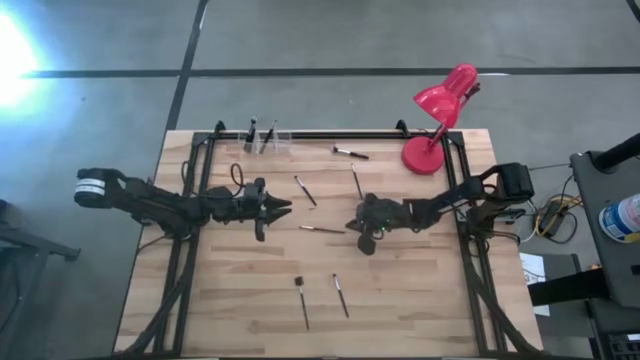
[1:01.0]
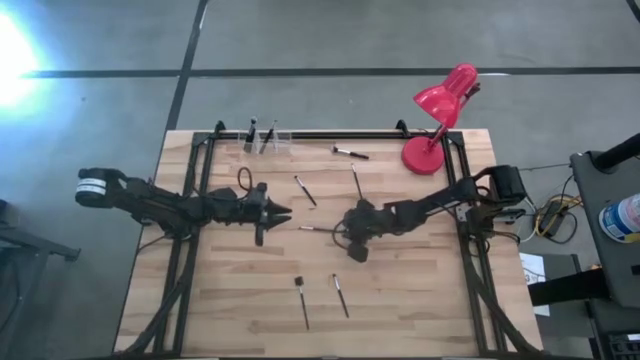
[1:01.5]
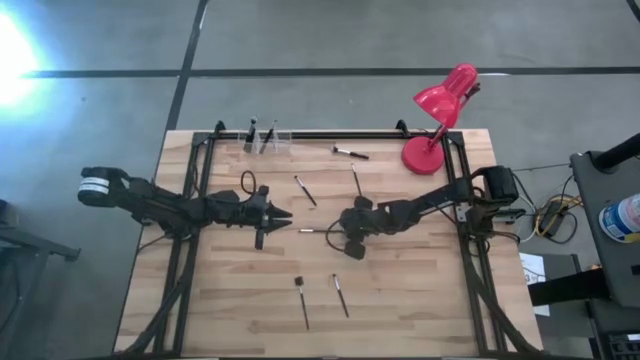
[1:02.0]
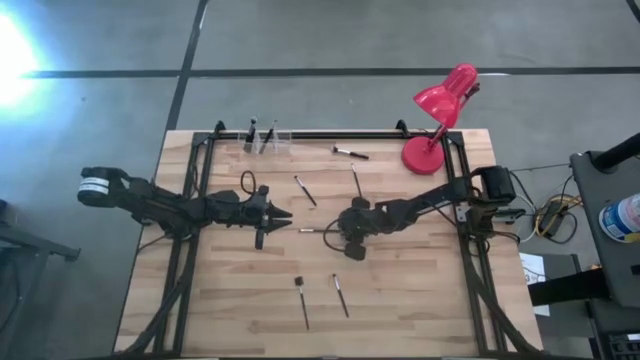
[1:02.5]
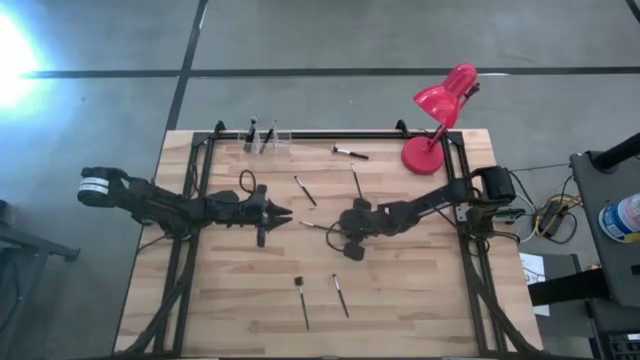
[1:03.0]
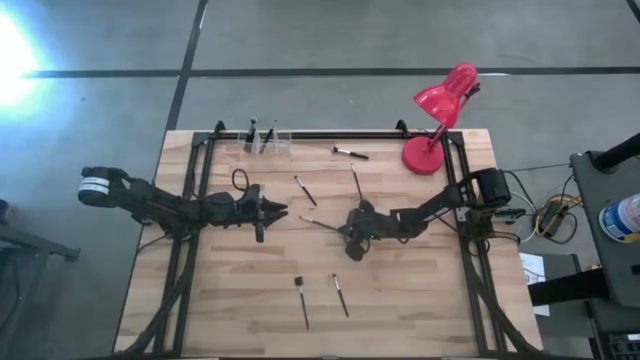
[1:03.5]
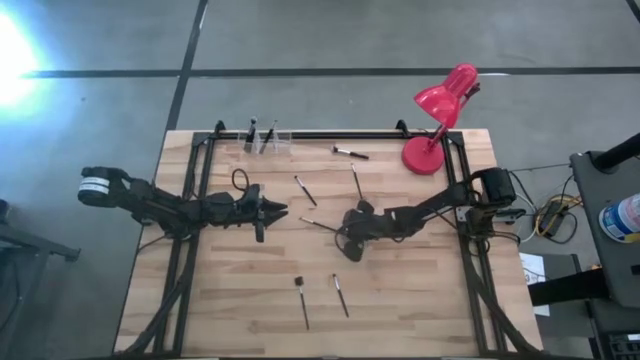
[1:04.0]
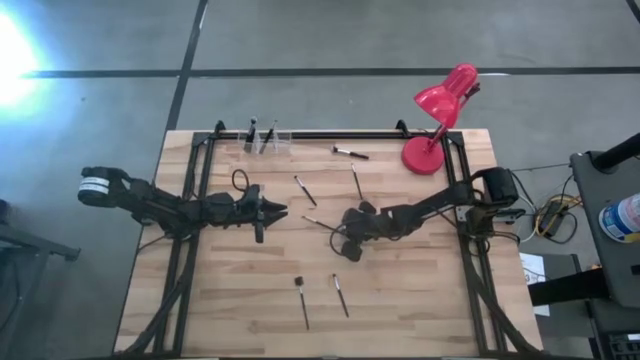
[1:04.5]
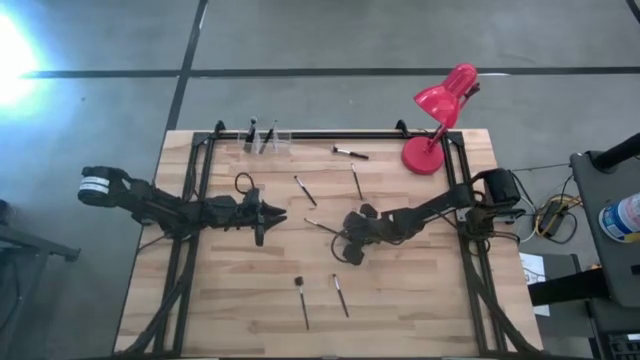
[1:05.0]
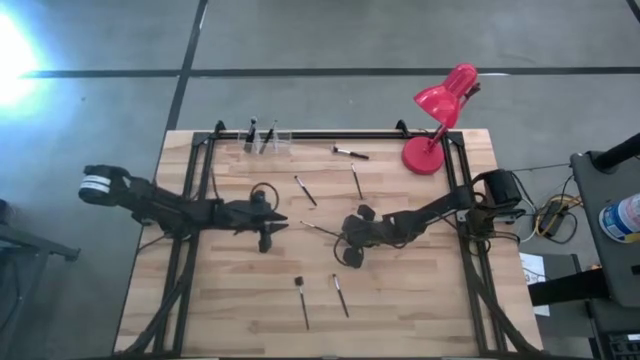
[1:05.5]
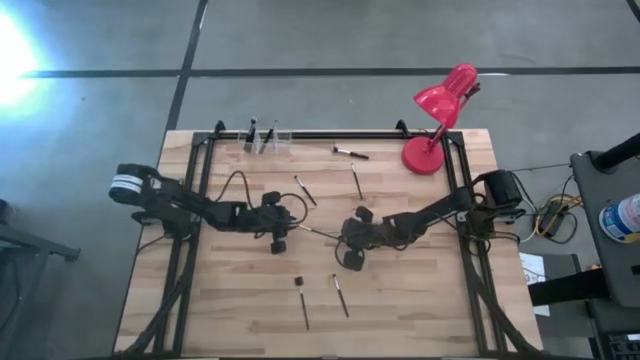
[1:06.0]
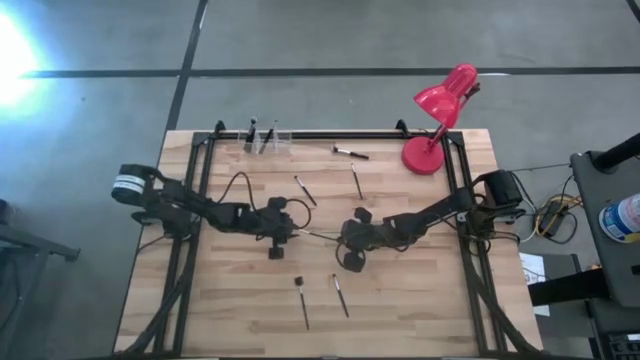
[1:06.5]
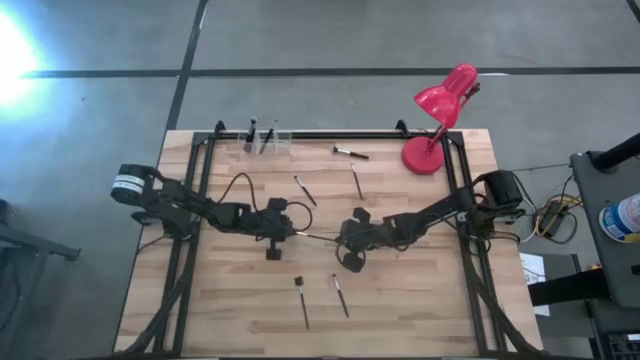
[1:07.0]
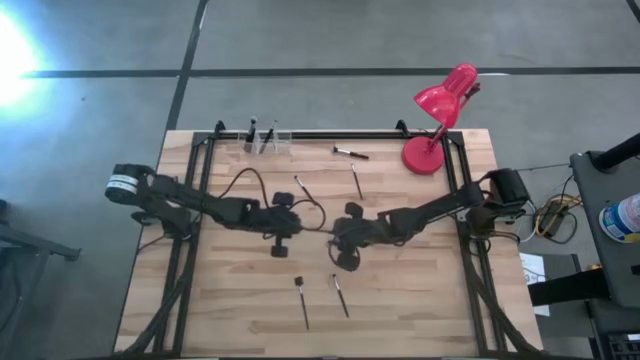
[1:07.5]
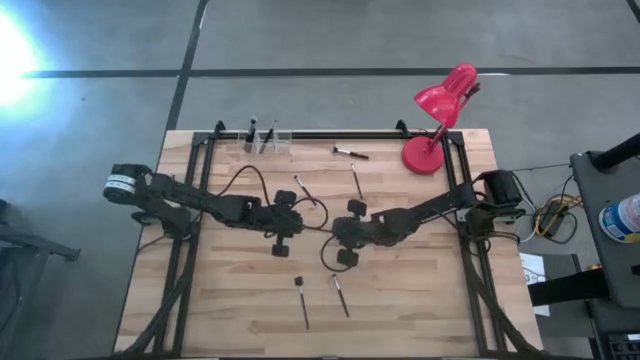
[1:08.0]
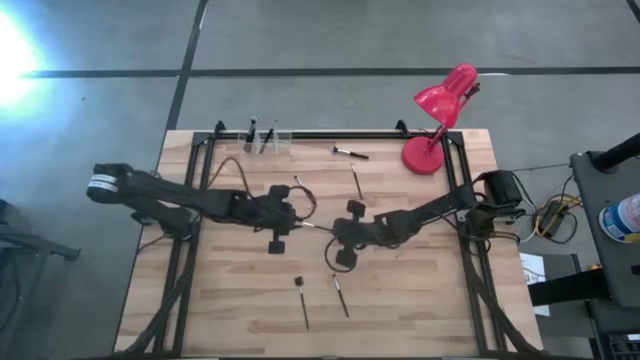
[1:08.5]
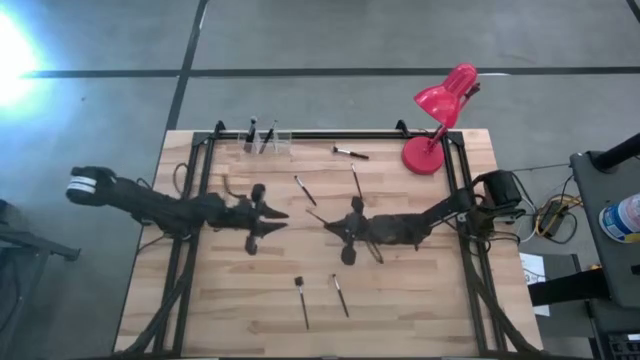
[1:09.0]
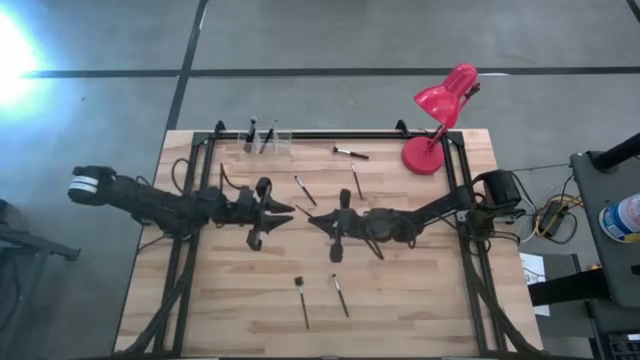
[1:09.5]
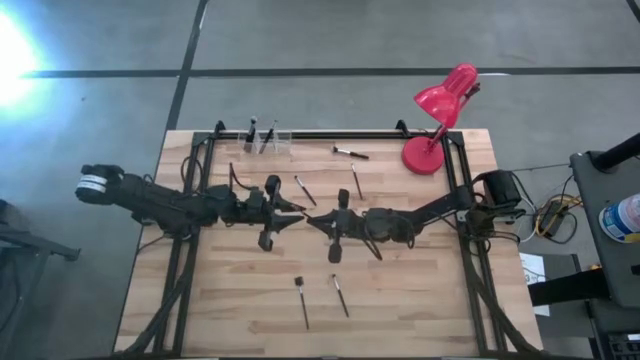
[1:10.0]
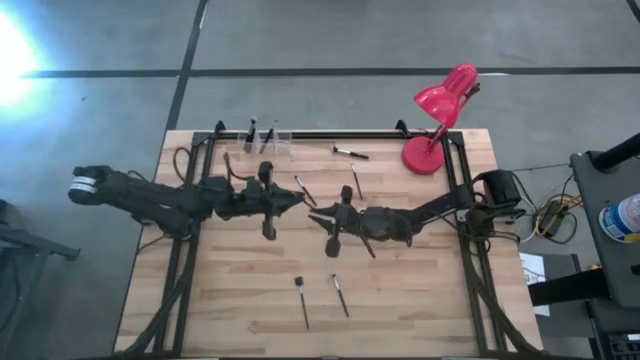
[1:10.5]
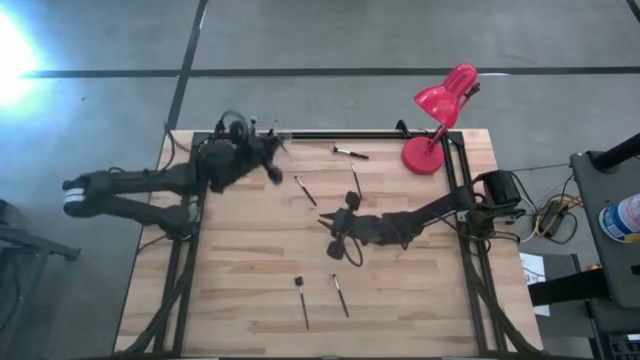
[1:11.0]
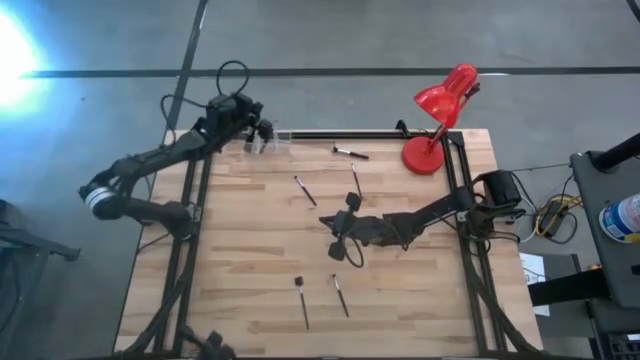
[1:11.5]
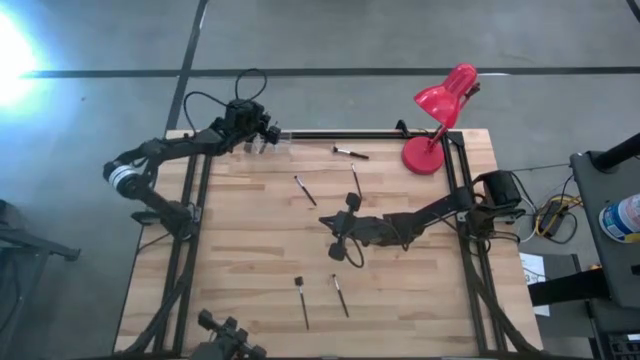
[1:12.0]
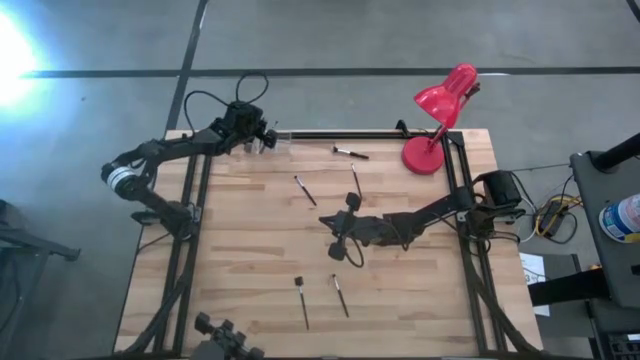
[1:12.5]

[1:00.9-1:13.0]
Task: Put items in baskets/containers
Put the black eyeshadow brush into the transparent organizer

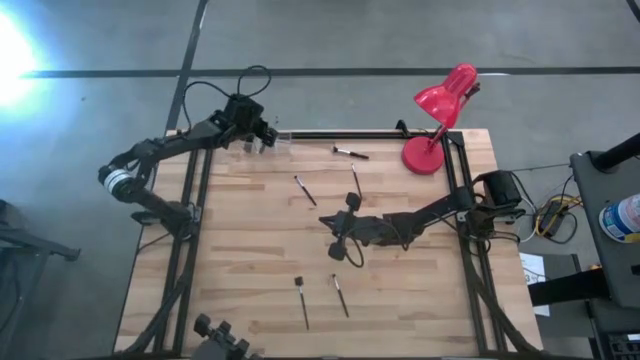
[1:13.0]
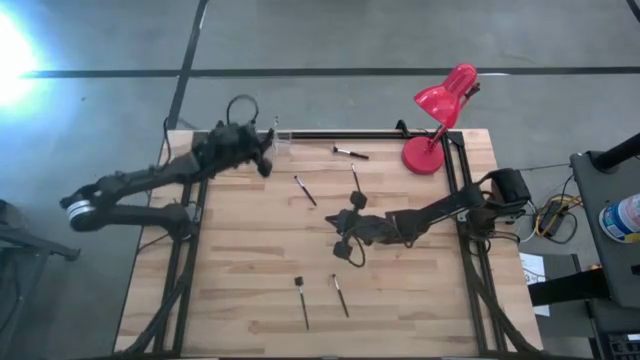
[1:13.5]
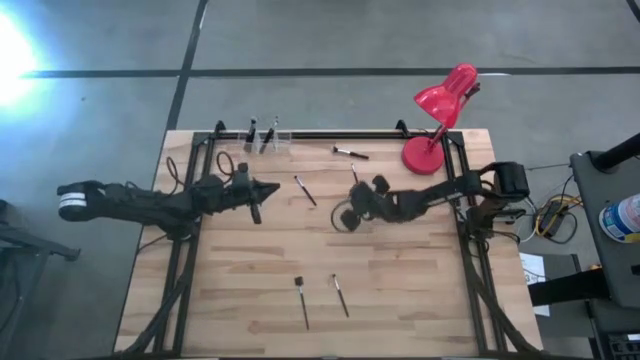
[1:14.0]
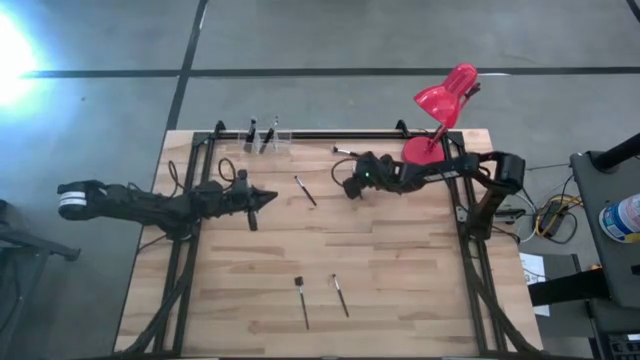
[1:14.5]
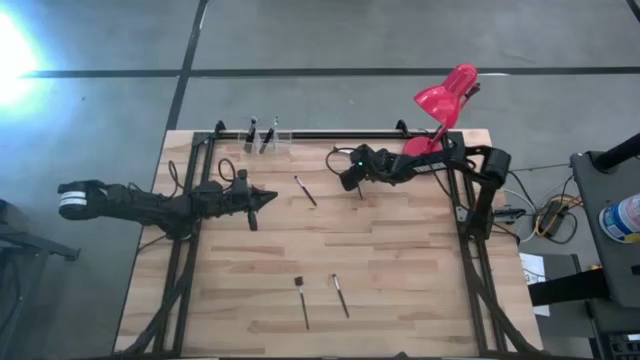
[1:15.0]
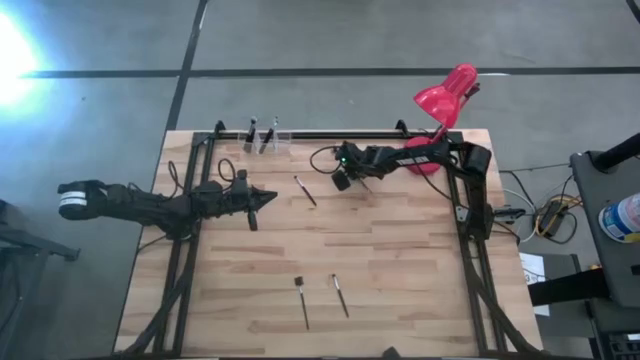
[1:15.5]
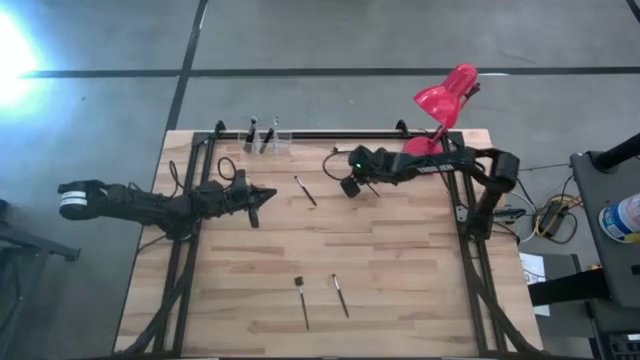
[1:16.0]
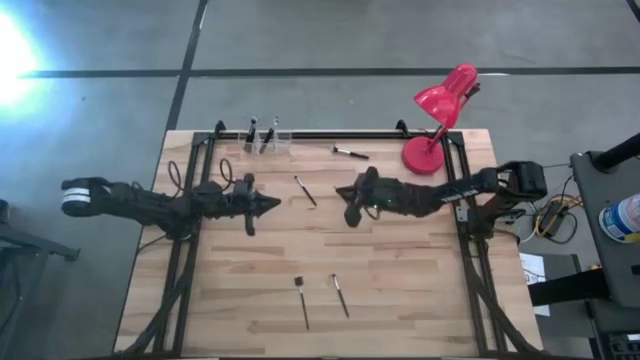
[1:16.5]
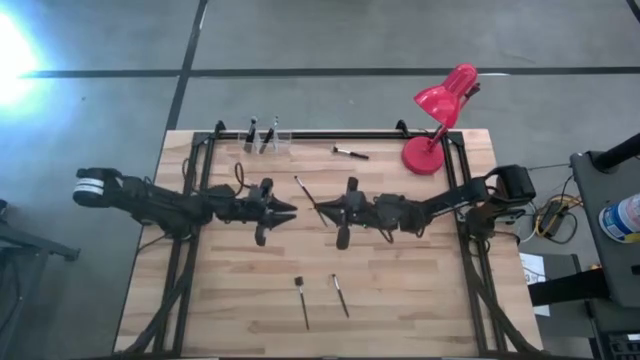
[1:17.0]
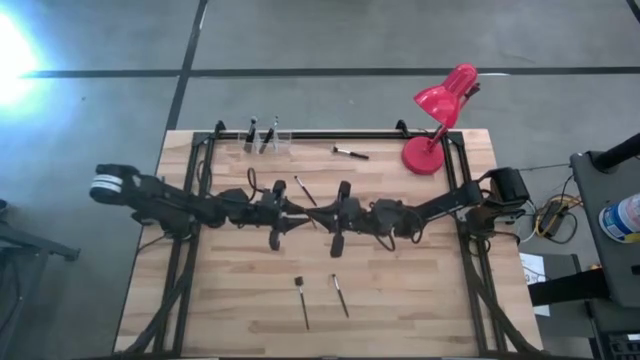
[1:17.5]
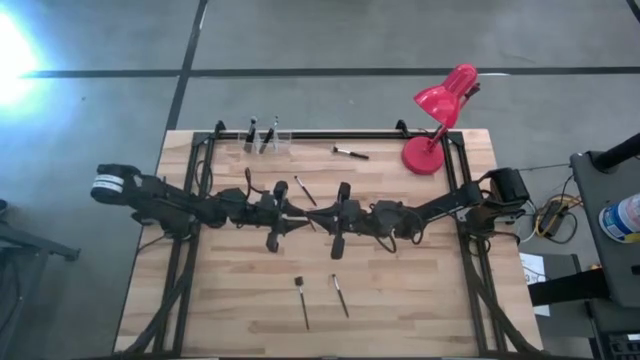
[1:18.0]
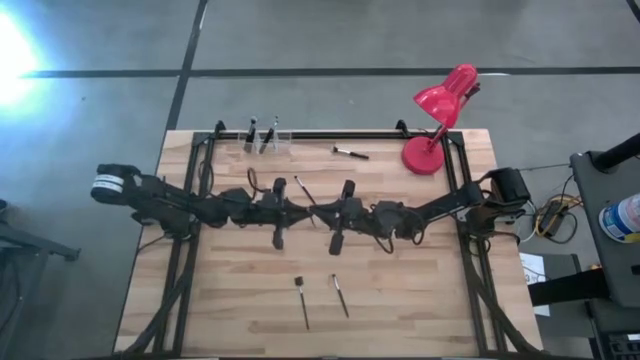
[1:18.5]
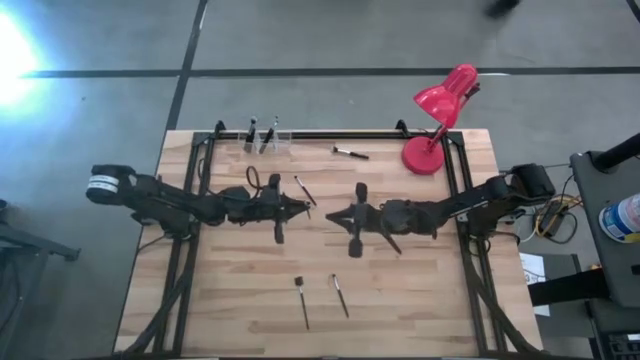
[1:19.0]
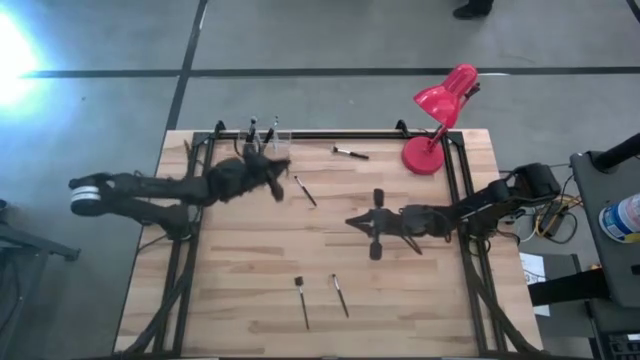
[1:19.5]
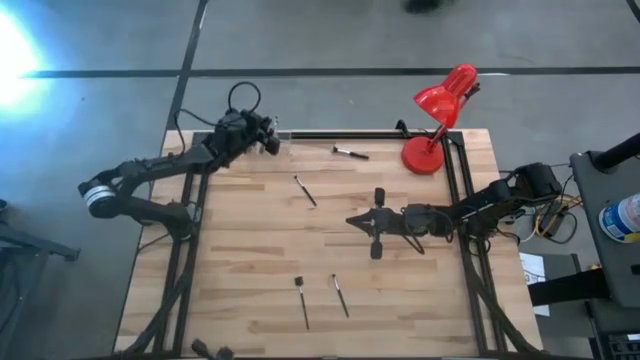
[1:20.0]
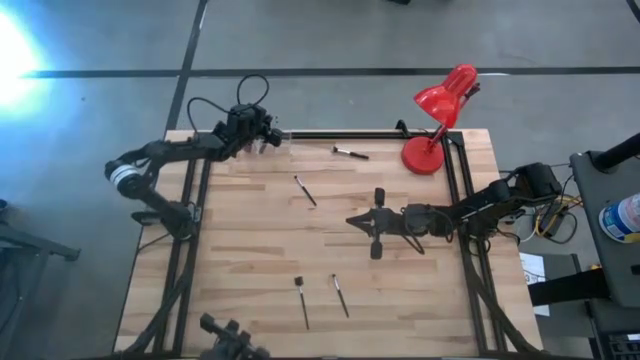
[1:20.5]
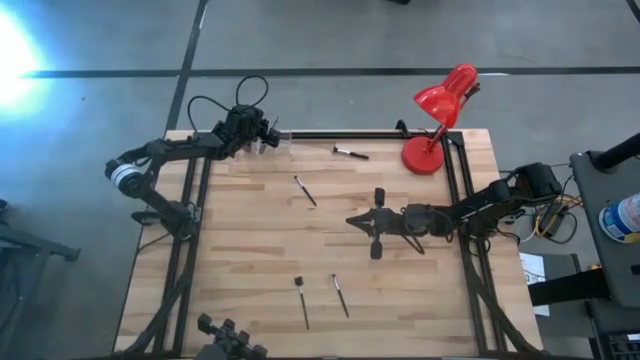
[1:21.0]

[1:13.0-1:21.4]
Put the black eyeshadow brush into the transparent organizer

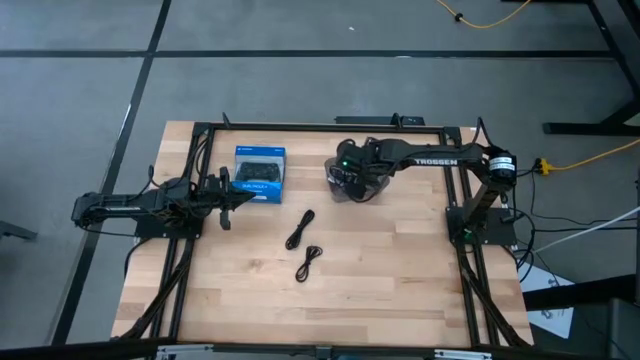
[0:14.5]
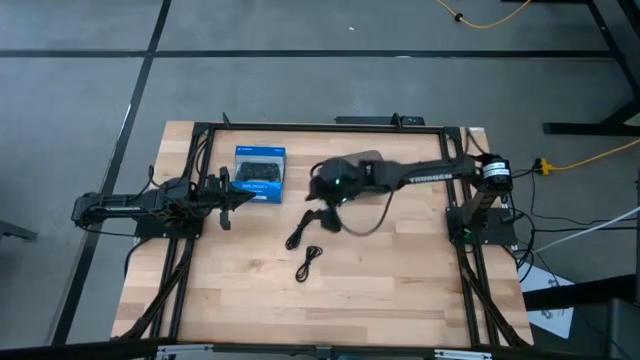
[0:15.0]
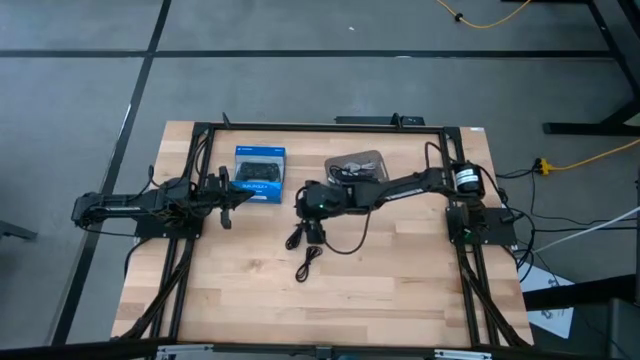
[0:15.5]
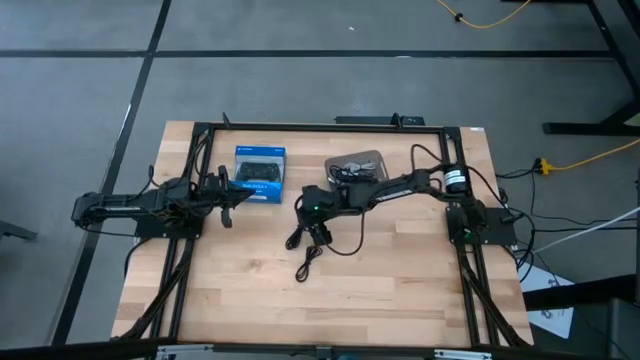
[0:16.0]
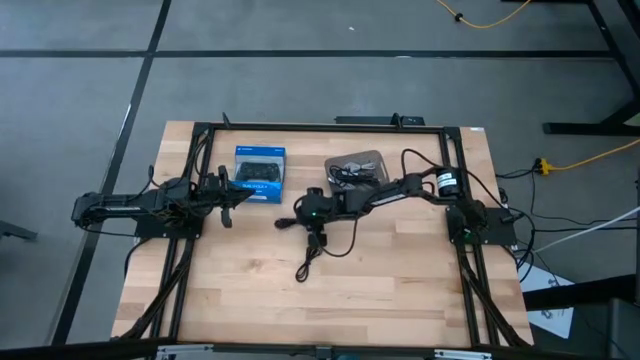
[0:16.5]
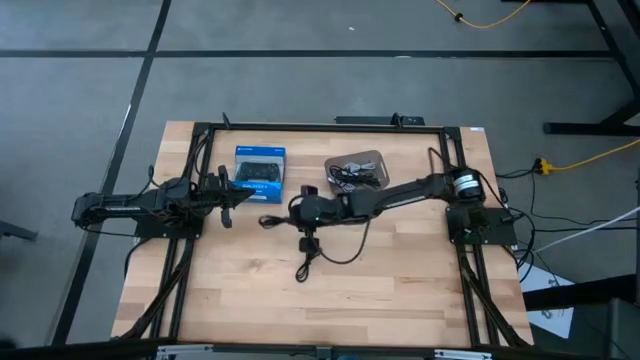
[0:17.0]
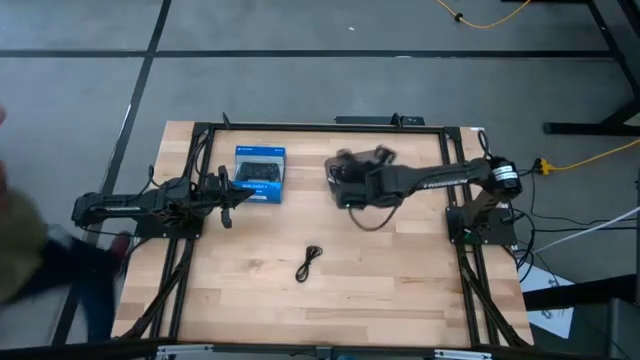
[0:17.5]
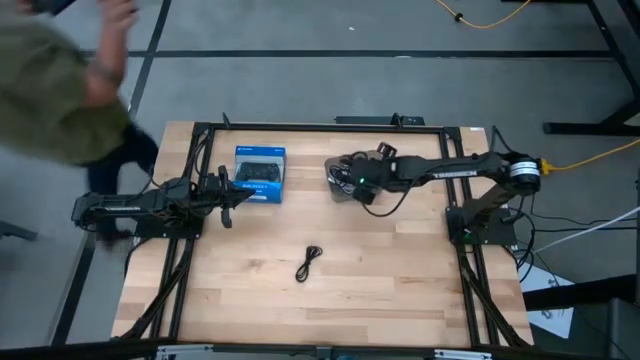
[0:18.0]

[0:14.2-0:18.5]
Task: Pick and place USB-C Cables
Put the top black charger cable into the black bin
